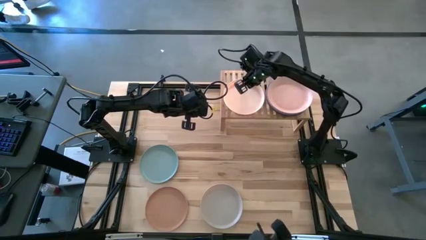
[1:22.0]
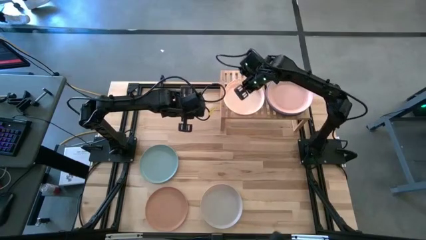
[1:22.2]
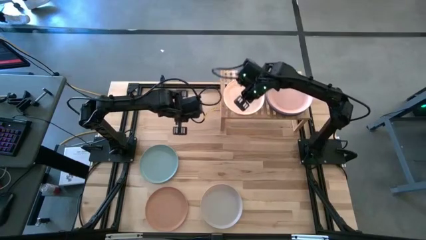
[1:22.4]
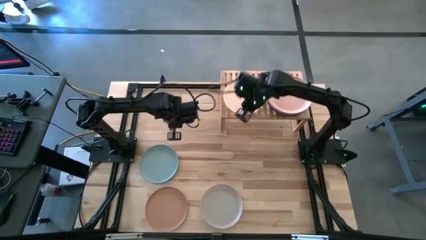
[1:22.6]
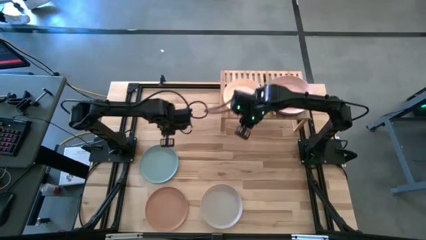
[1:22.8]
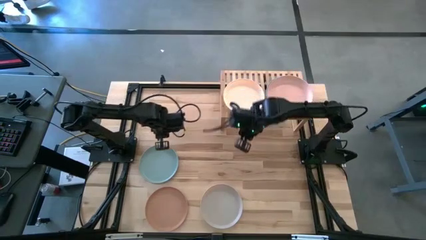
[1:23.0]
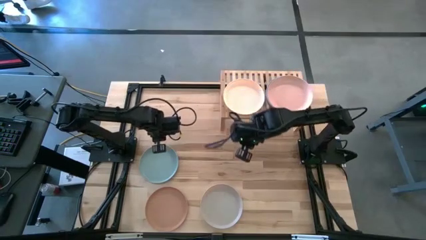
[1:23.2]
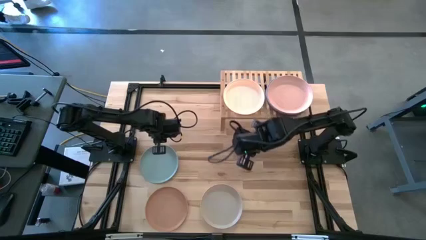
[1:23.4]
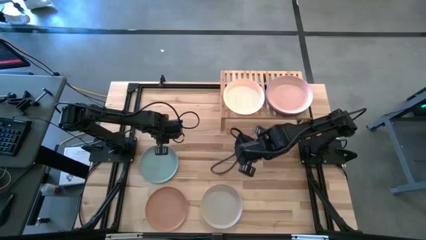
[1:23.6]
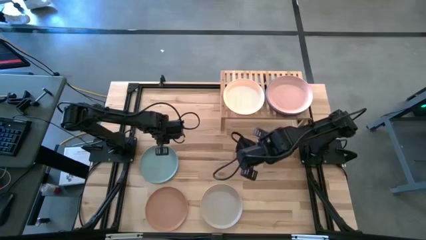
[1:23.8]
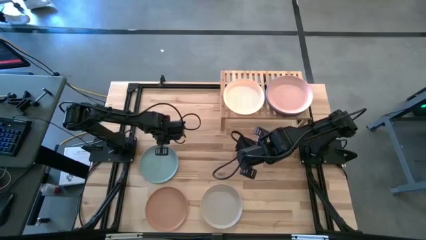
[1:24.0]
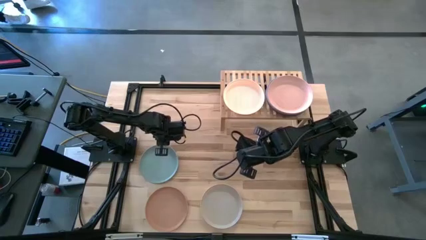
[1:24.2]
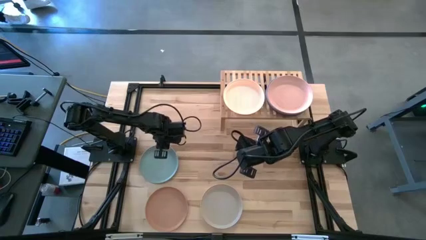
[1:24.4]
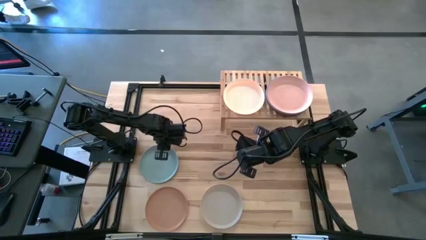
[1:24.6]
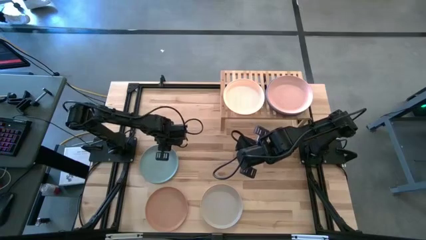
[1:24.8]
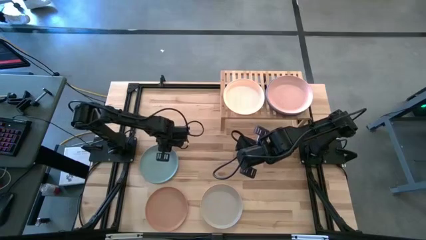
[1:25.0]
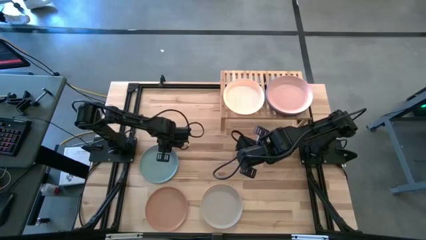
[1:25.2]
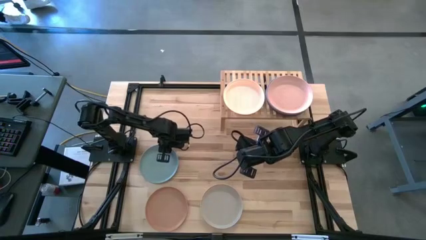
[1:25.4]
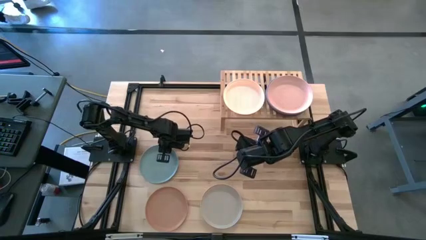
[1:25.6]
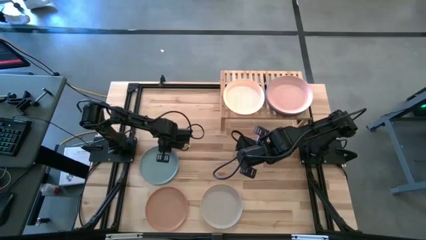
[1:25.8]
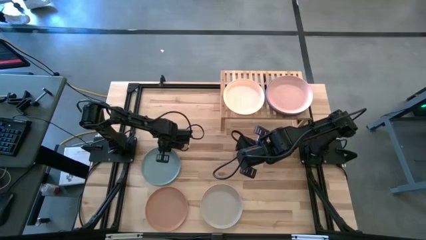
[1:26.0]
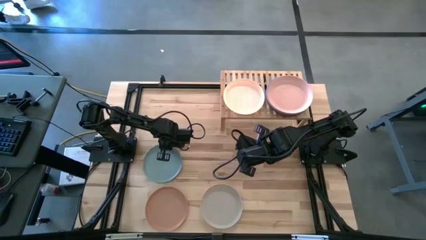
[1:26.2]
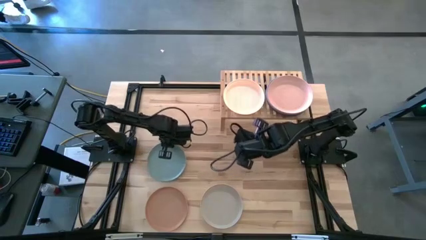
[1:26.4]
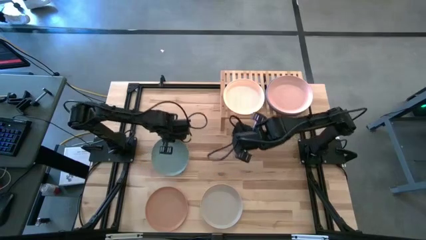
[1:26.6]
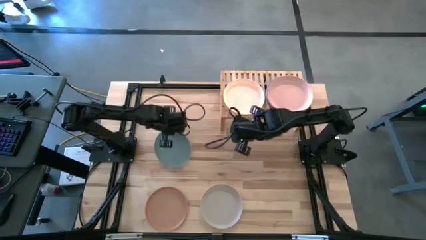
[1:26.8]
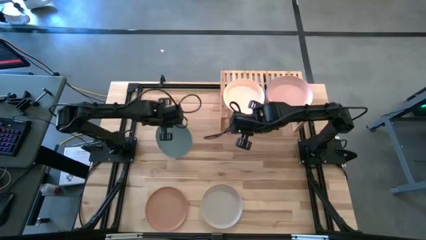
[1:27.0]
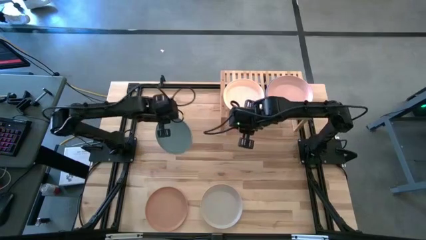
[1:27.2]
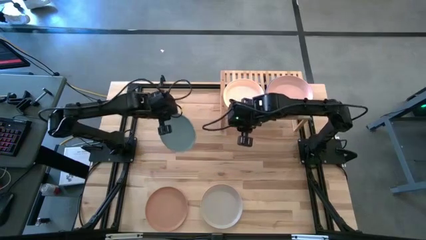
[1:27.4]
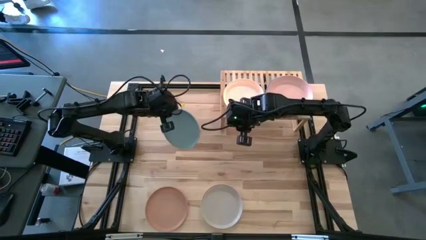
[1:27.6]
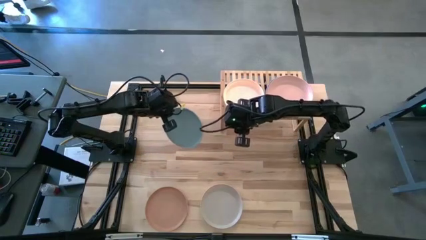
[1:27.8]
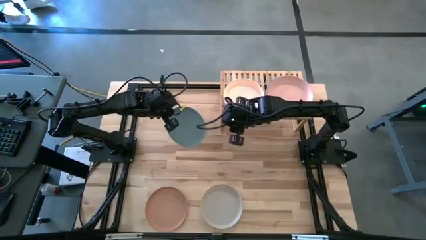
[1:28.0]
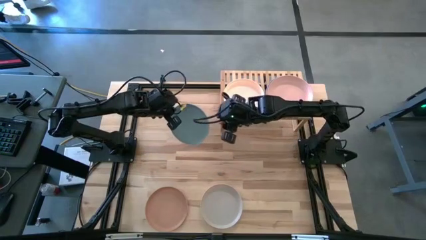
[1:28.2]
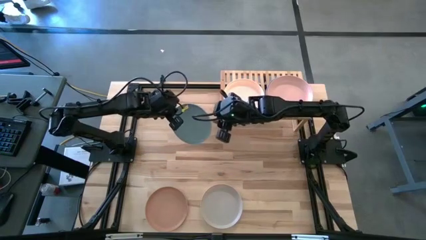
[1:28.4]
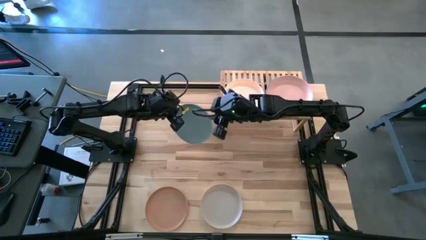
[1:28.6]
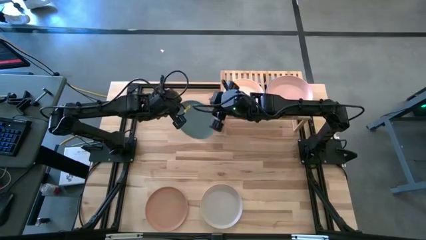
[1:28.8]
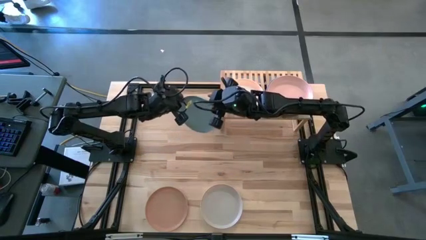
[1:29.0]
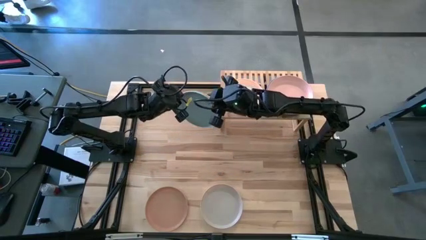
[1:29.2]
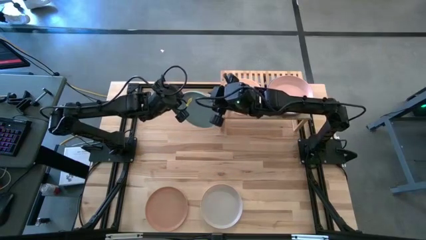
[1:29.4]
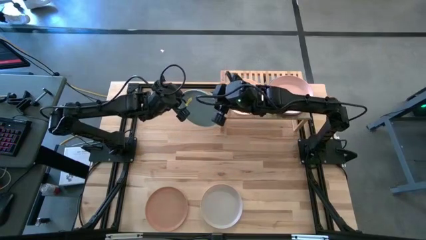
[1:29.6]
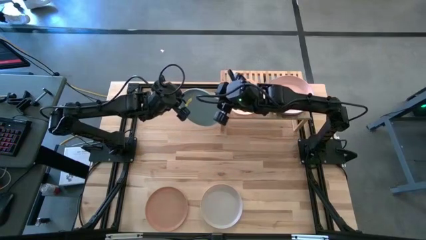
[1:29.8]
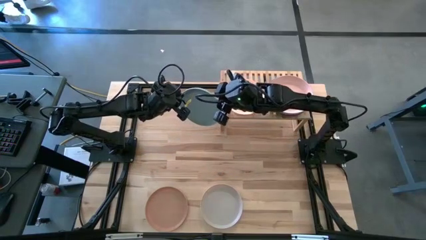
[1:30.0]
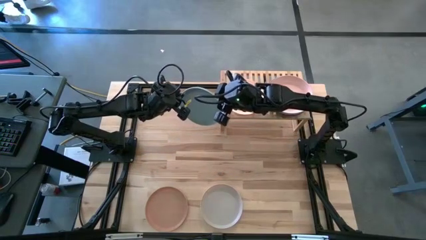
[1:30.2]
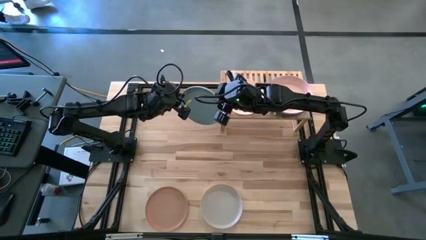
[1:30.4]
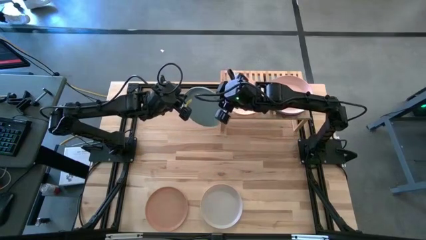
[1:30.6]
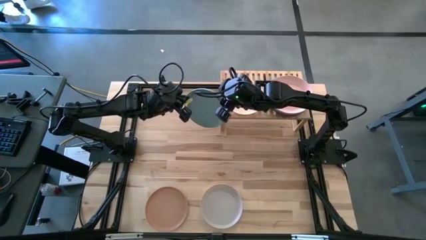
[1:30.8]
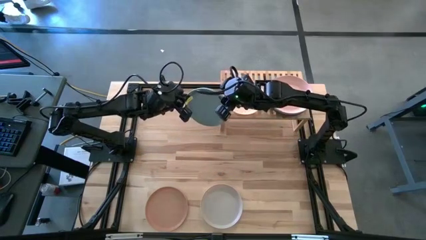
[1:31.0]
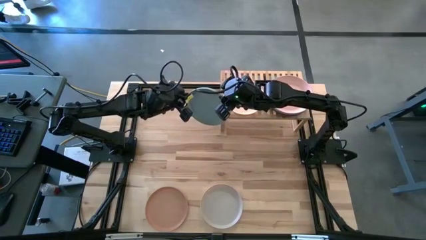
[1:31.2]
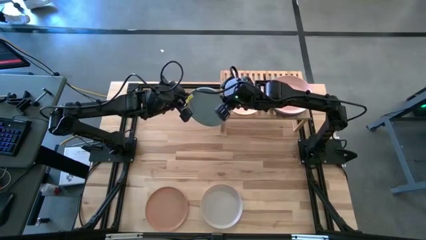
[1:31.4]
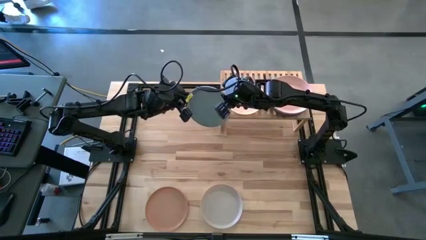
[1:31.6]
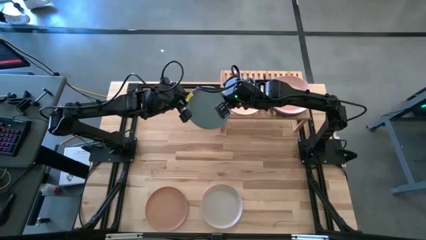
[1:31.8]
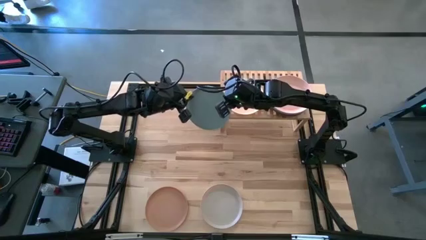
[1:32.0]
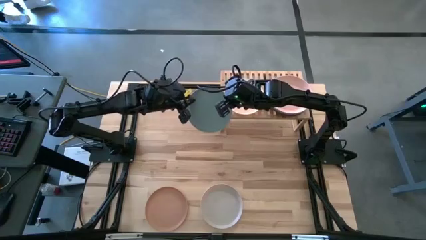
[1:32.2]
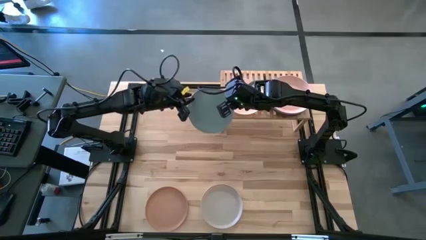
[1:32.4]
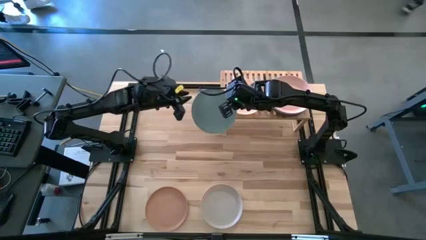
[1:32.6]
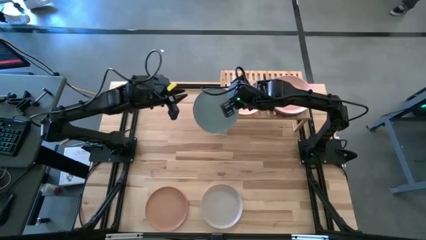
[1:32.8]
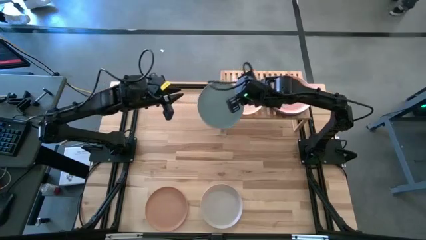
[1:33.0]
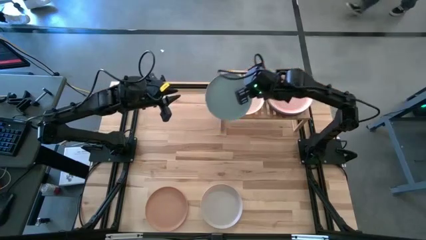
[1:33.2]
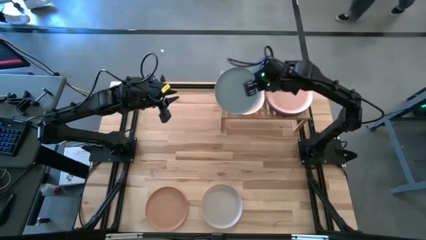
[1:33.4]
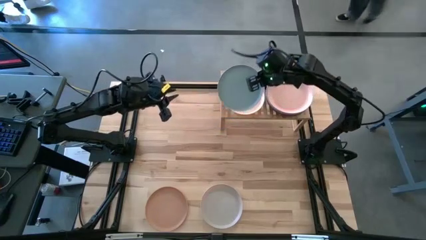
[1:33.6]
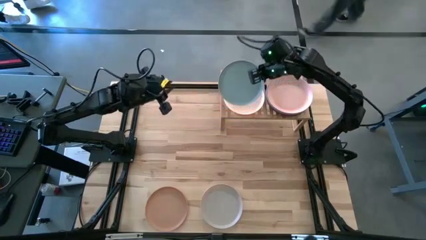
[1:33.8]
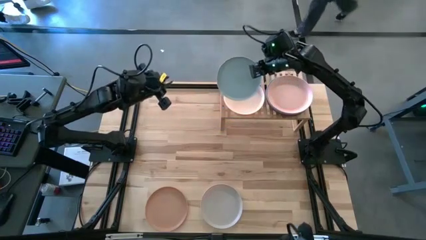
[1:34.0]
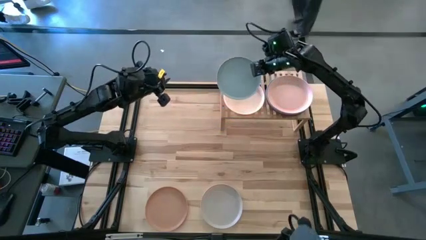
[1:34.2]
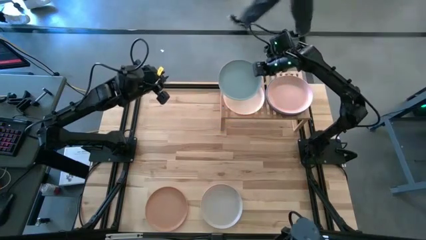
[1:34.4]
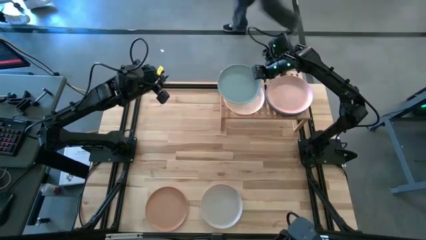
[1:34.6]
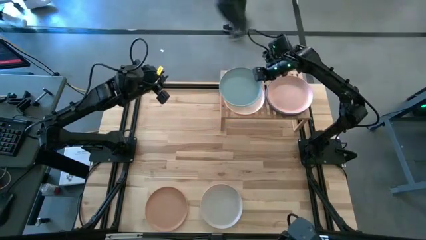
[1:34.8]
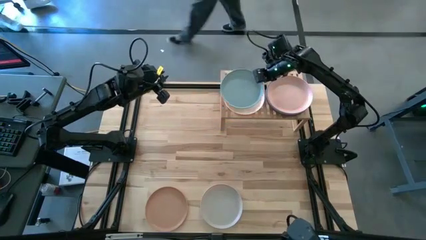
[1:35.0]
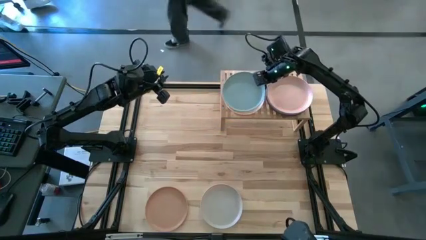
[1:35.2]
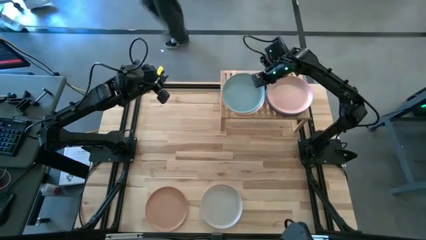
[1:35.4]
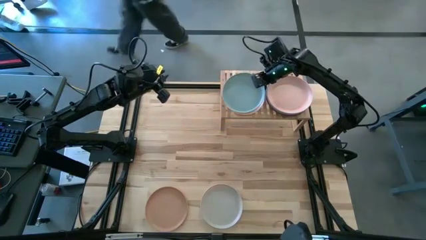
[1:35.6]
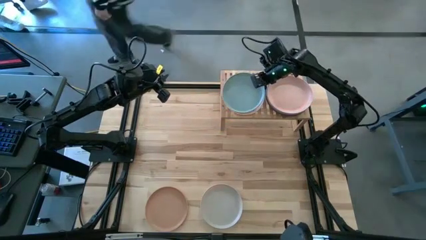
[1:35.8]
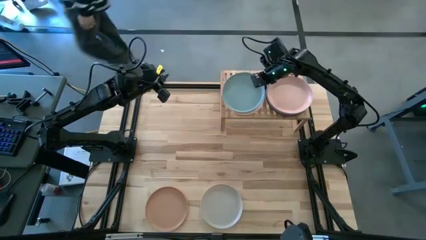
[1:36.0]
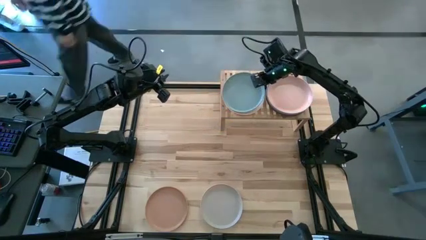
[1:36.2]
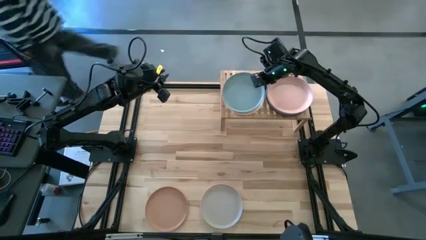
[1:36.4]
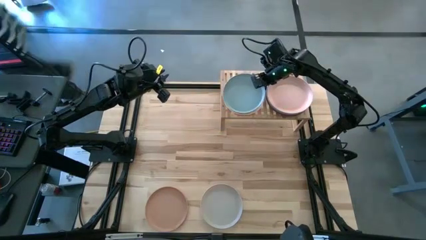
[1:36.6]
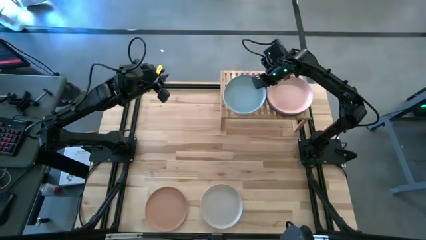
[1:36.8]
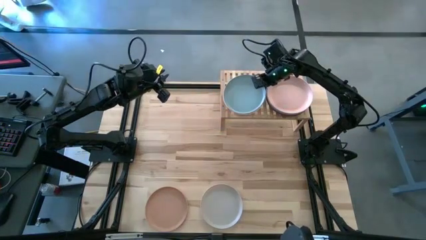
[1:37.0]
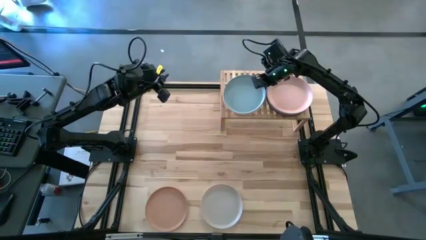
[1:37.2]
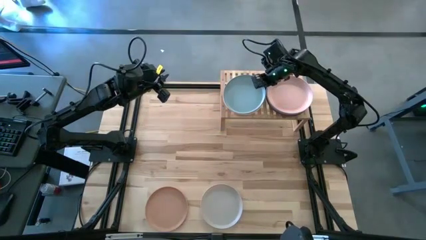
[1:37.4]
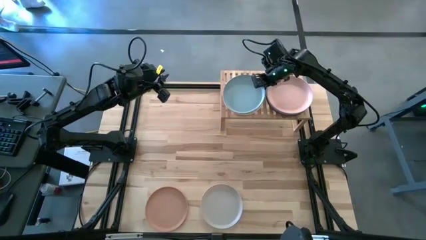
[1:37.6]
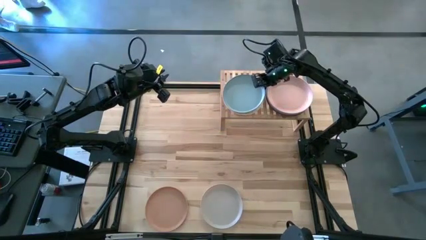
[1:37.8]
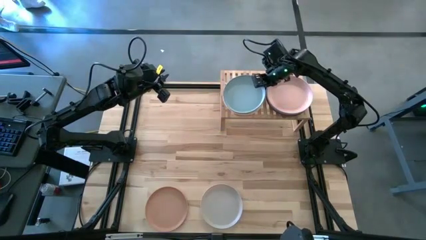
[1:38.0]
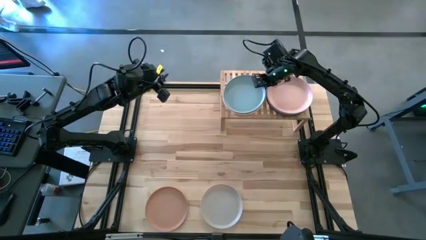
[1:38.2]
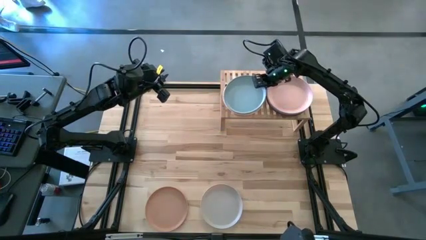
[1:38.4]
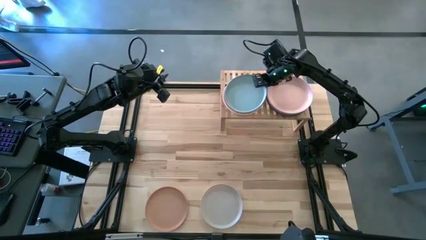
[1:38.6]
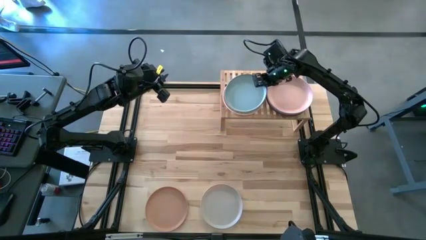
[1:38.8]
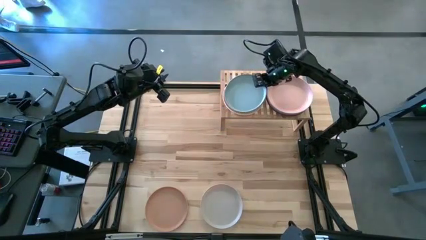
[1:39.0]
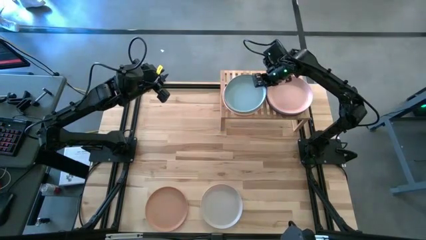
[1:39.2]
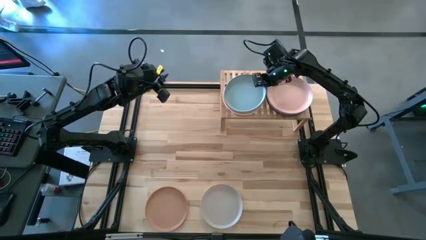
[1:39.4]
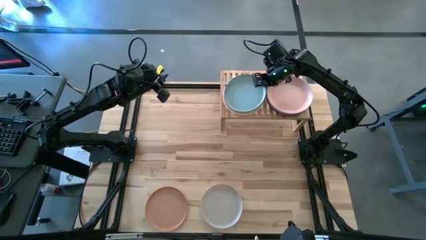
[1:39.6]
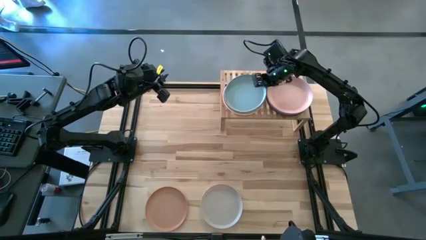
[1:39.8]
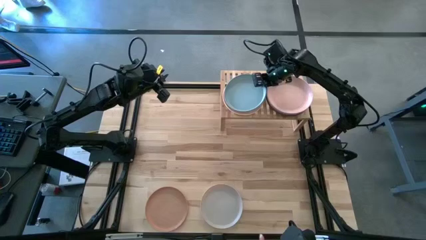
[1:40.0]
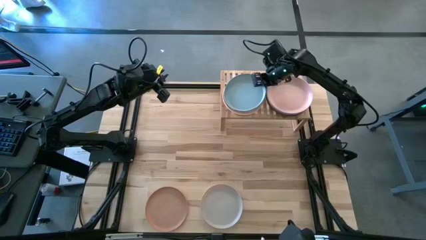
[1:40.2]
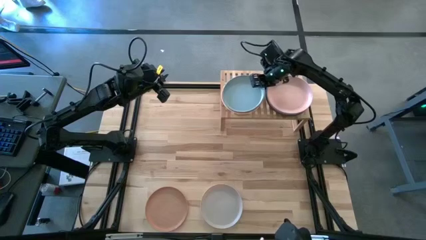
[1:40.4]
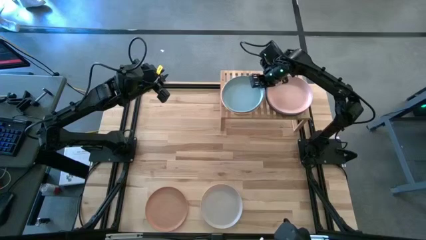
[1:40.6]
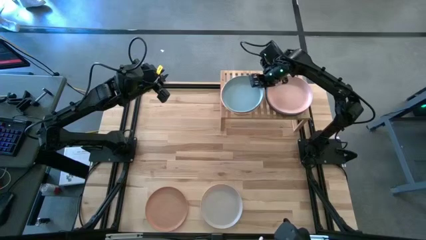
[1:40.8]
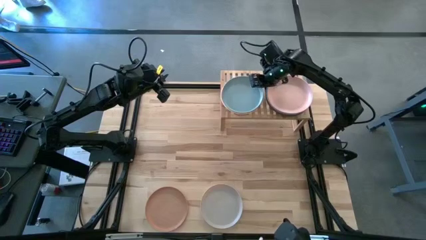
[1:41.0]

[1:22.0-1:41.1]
Task: Place and stack plates onto a shelf
Stack the light blue plate on top of the white plate on the shelf
